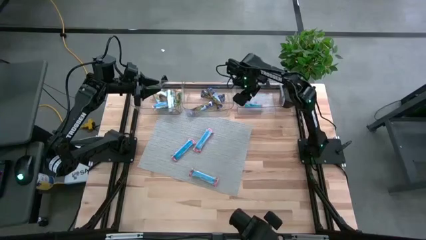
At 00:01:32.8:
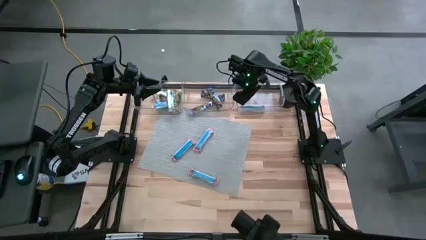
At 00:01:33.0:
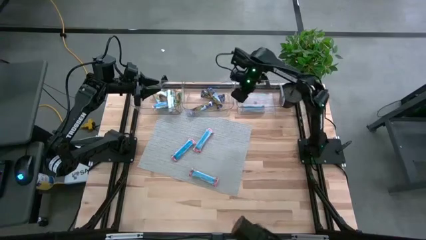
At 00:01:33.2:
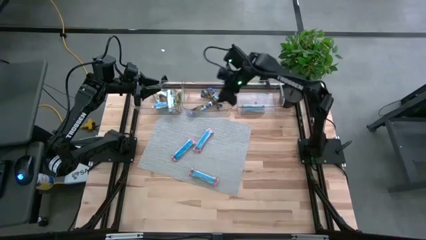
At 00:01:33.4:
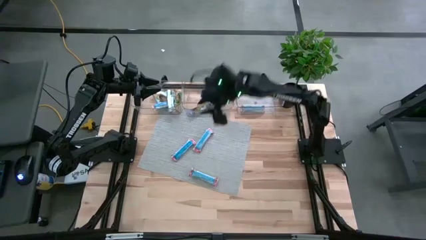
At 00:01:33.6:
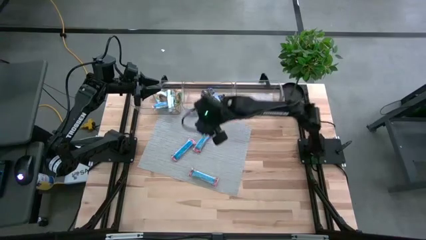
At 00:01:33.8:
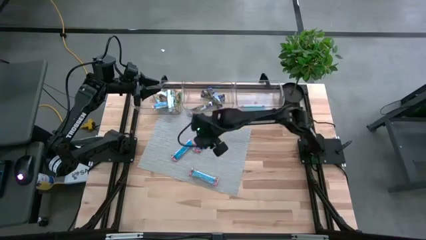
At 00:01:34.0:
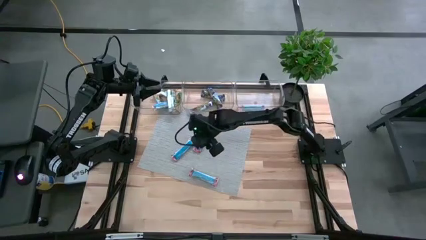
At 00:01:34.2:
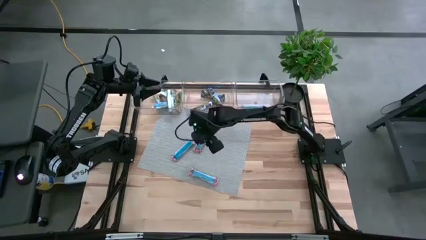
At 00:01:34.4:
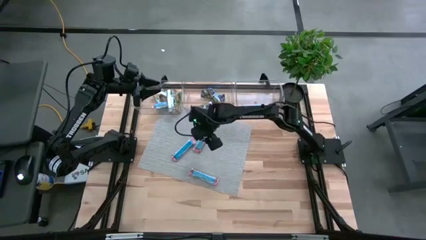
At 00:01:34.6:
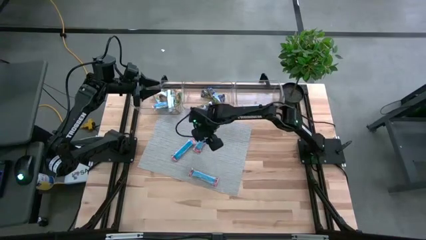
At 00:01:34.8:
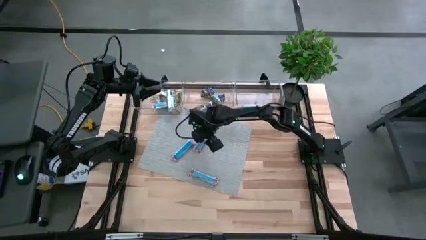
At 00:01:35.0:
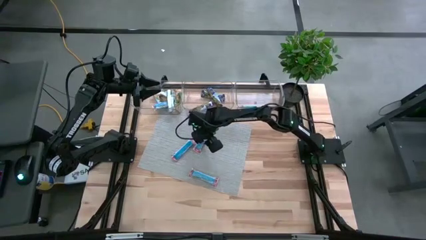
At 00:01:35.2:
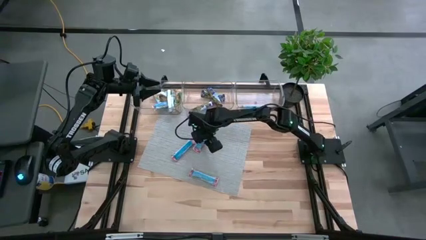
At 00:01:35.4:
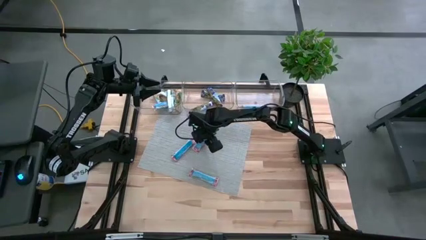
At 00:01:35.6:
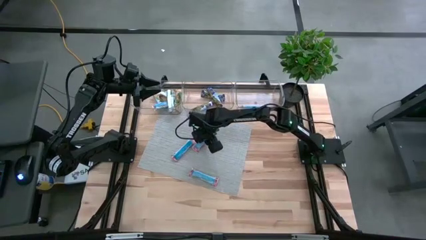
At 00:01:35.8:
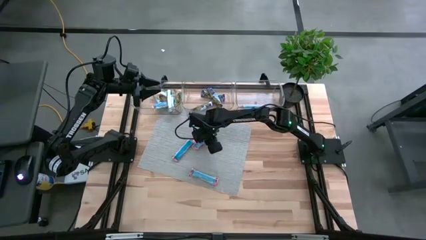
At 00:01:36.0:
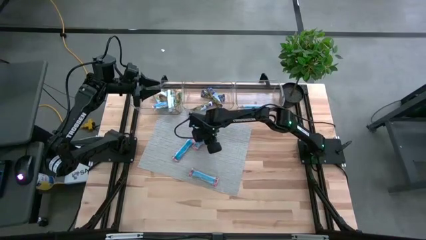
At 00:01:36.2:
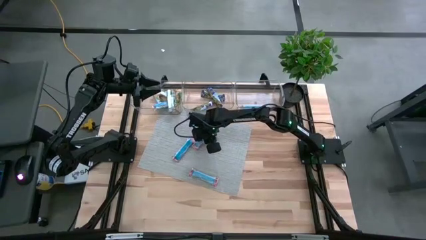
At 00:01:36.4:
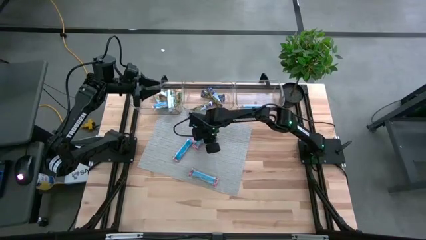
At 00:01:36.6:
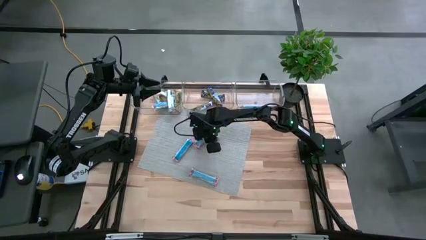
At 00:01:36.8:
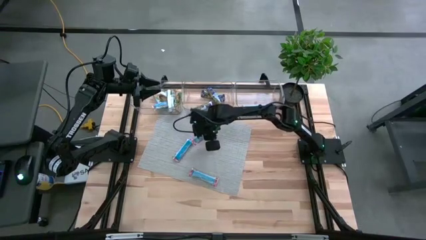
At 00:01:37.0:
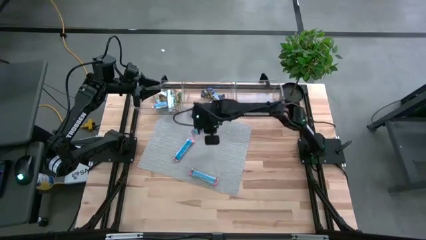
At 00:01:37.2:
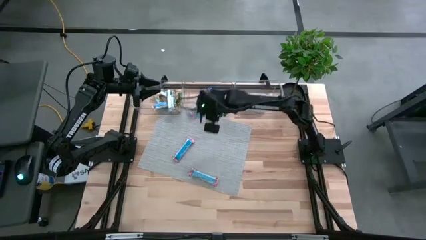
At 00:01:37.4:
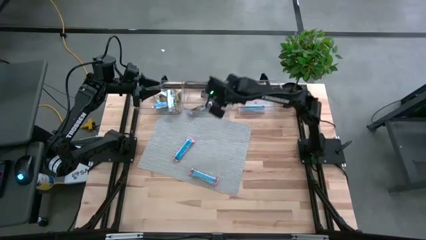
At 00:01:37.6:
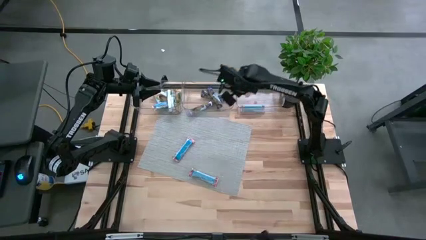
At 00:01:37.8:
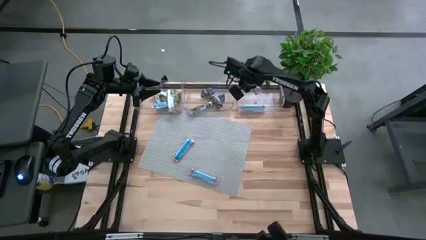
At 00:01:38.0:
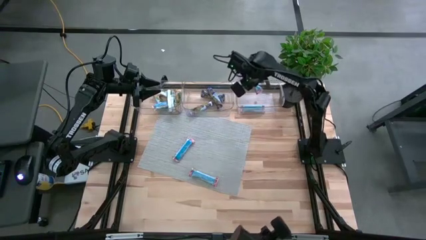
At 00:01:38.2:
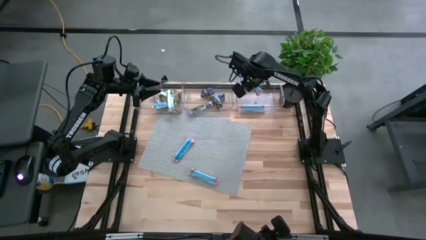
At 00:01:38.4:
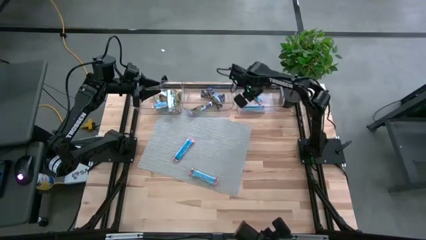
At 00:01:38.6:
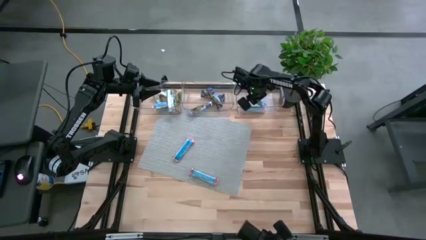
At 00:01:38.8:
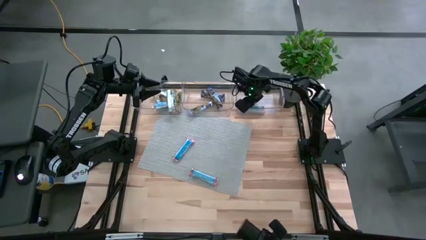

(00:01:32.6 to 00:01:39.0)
Task: Pick and place Granola Bars by type
Put the red granola bar into the right transparent bin

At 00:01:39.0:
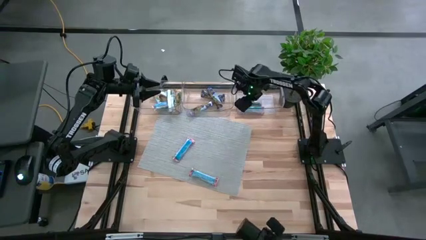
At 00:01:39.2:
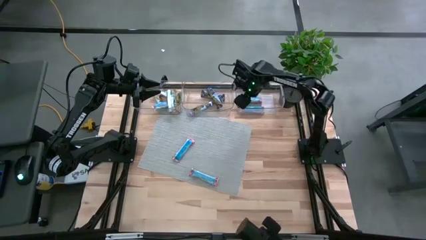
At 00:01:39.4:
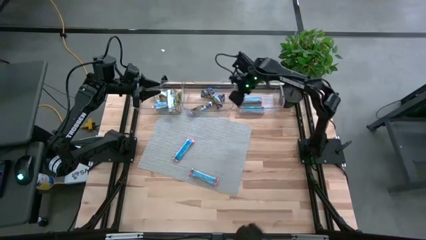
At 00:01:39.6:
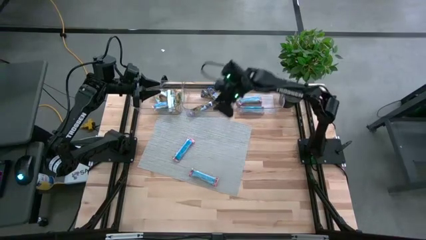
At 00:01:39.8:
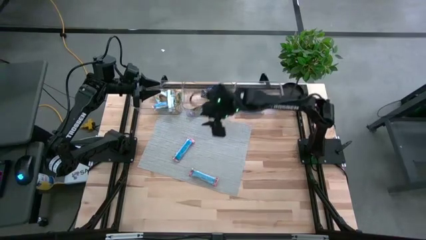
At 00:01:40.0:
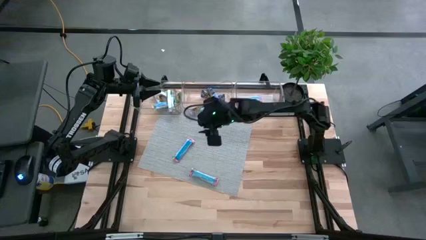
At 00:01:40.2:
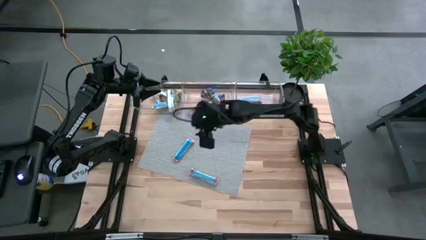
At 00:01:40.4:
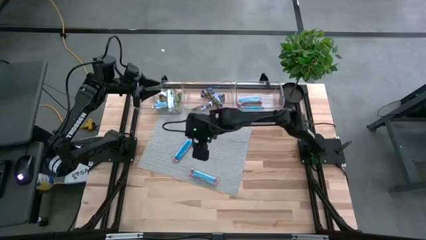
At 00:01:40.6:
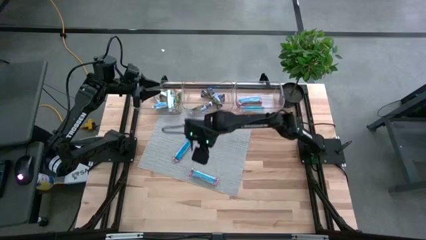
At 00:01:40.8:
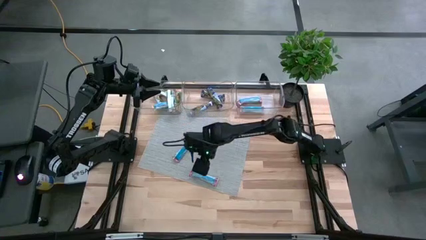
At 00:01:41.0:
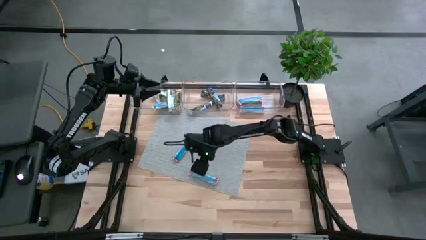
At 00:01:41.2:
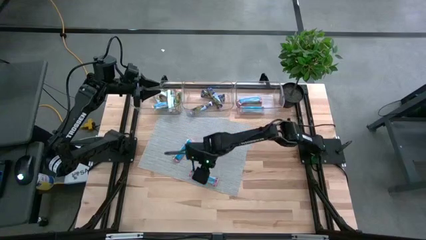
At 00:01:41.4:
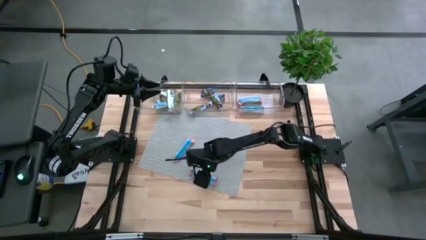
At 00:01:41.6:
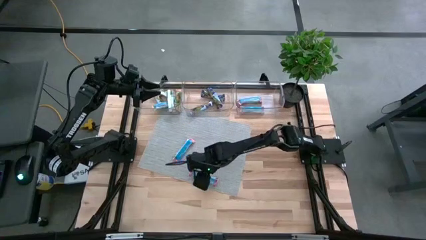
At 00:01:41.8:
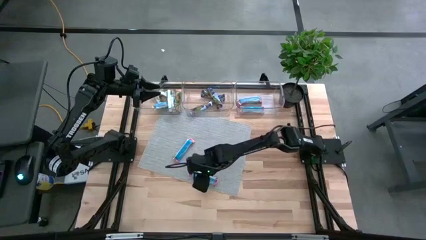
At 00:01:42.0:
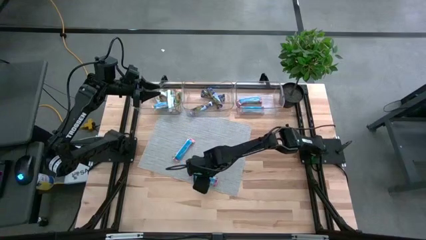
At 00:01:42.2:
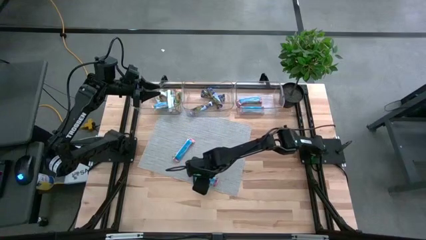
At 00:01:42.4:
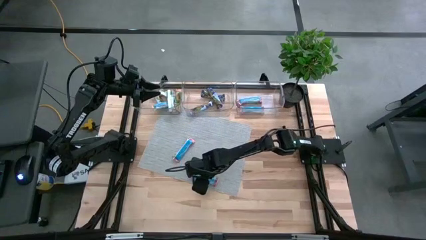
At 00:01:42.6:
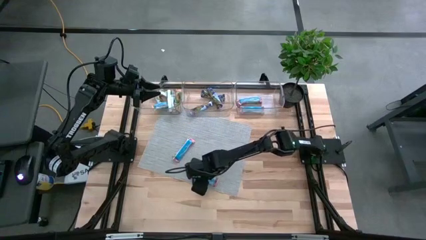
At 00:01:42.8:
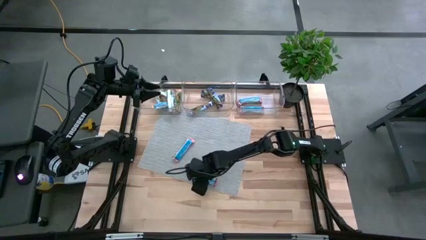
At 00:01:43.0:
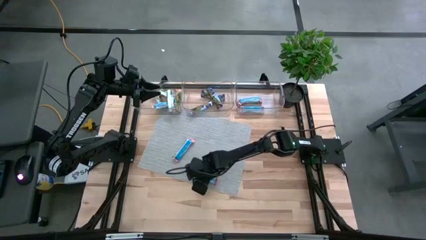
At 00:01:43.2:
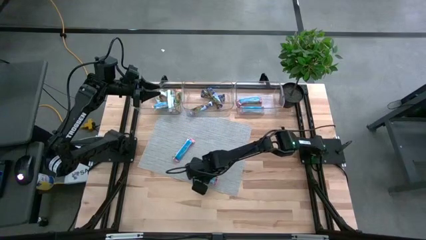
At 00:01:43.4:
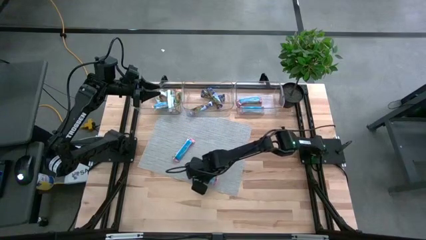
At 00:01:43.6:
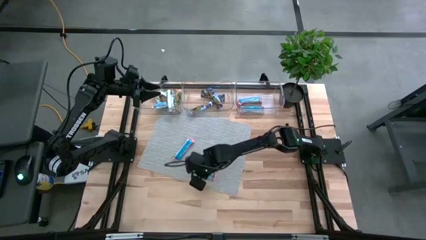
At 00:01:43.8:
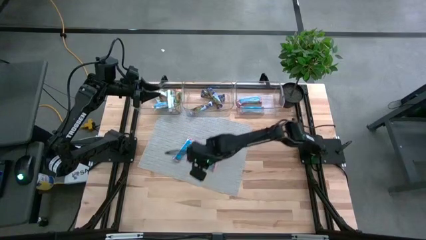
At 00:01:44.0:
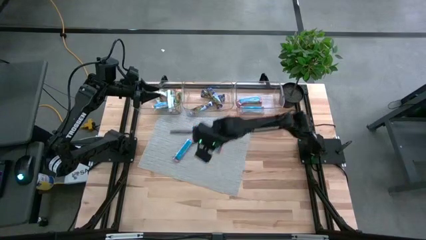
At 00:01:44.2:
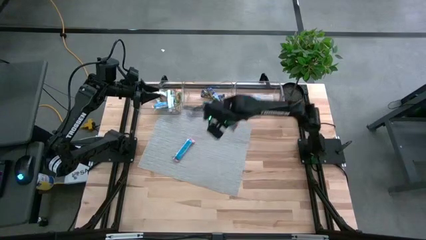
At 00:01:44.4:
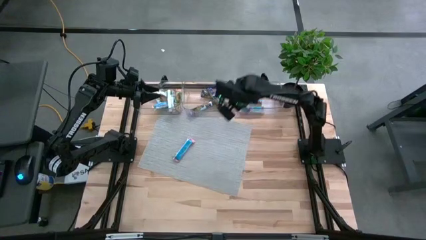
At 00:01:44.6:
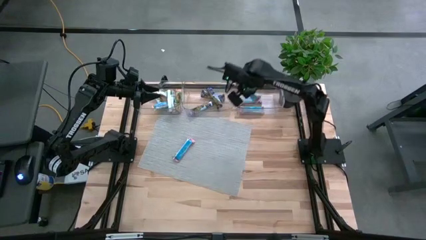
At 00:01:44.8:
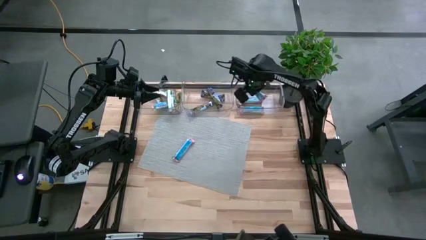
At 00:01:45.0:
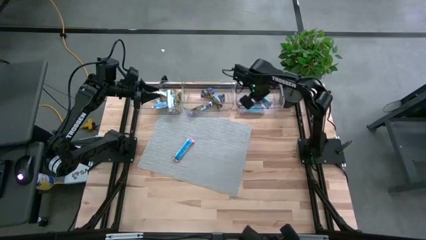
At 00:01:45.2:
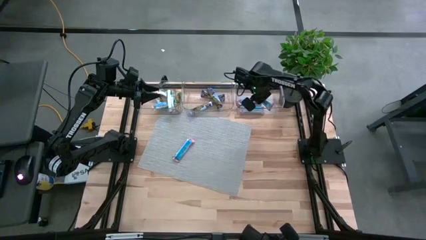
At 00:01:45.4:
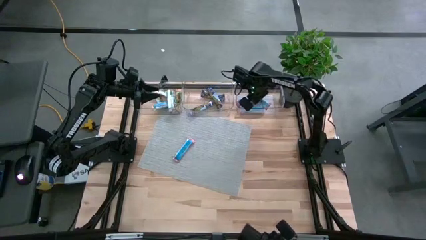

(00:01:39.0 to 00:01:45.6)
Put the red granola bar into the right transparent bin
